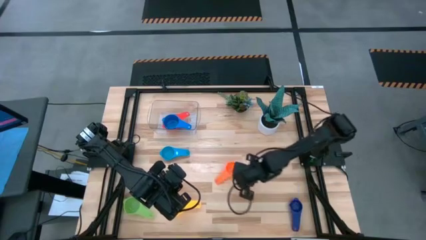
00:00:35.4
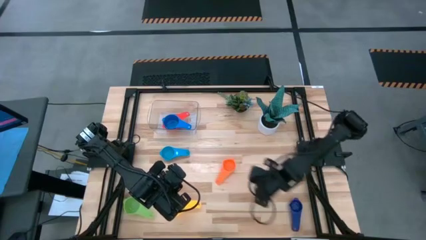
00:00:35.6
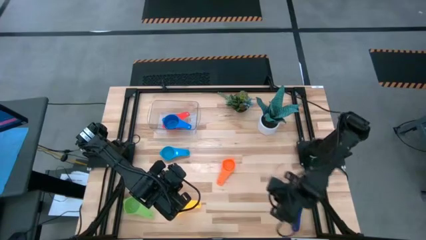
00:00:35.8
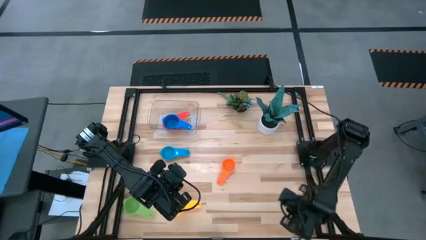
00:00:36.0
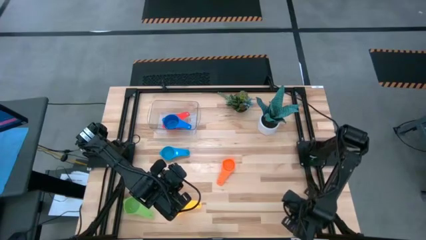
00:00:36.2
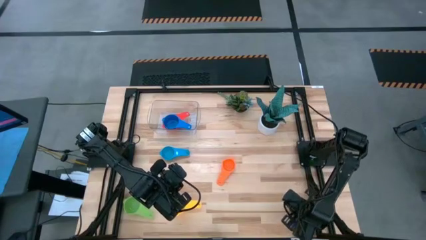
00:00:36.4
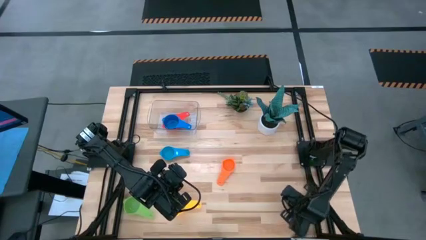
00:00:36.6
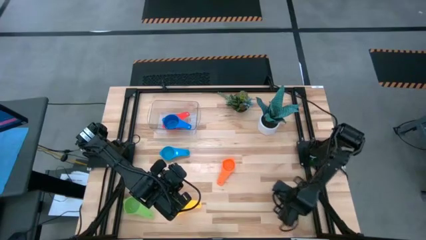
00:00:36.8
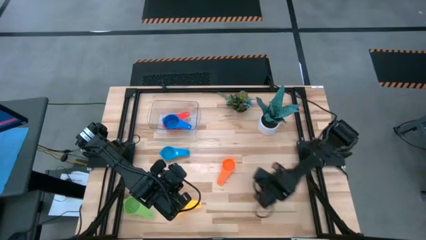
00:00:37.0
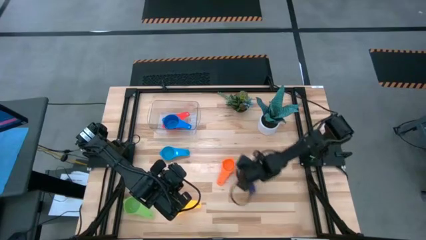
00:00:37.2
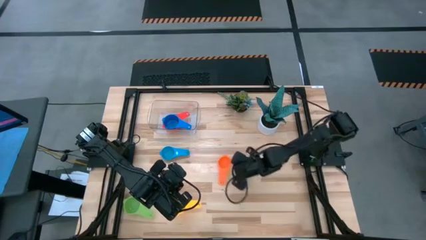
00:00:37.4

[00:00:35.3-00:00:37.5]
Task: Nest measuring cups in basket
Move the dark blue measuring cup to the center of the table

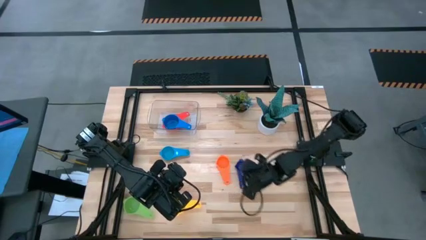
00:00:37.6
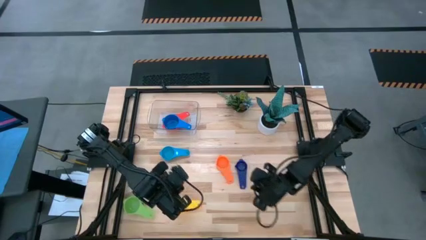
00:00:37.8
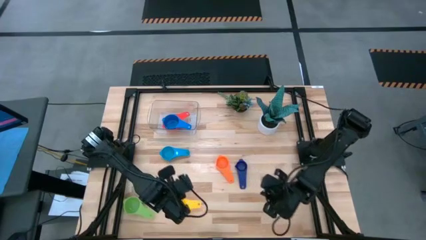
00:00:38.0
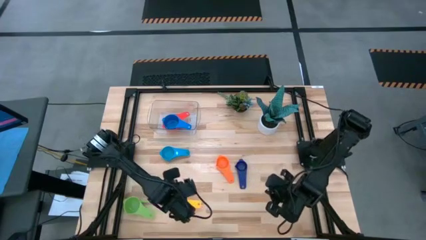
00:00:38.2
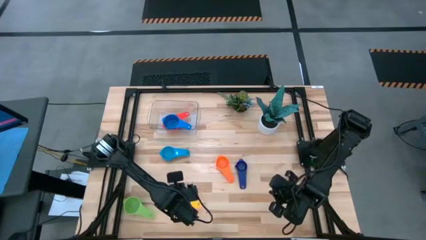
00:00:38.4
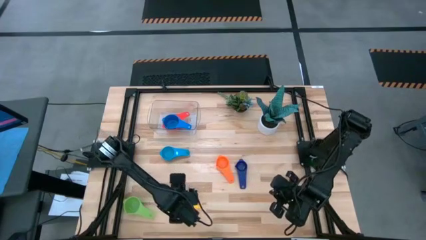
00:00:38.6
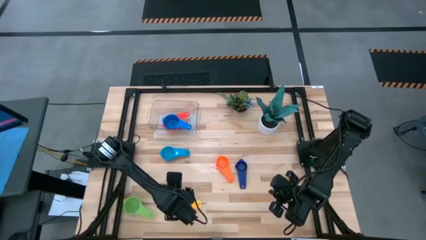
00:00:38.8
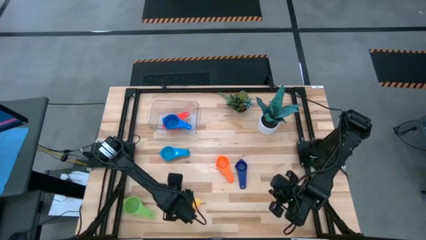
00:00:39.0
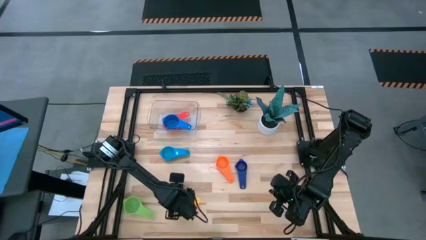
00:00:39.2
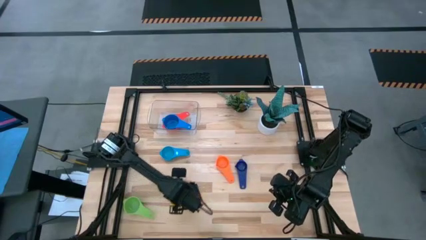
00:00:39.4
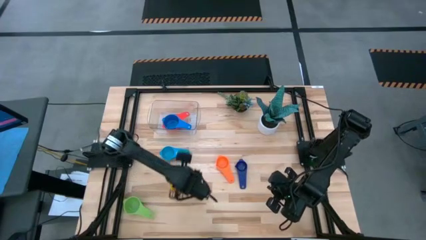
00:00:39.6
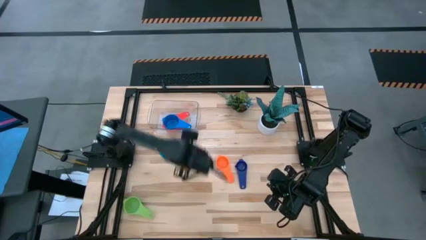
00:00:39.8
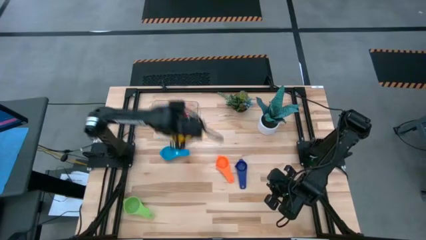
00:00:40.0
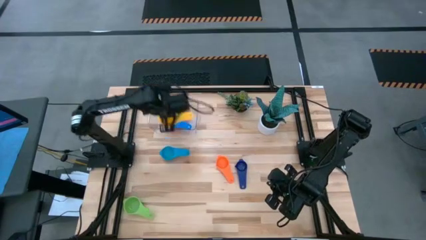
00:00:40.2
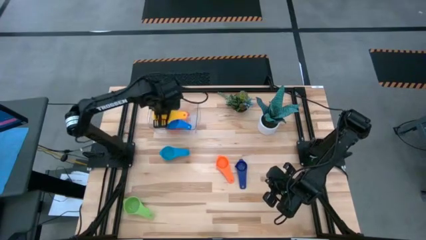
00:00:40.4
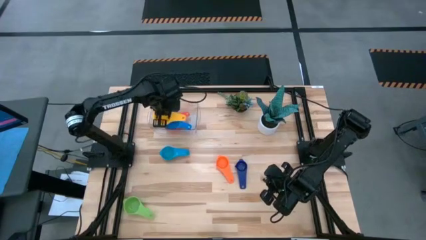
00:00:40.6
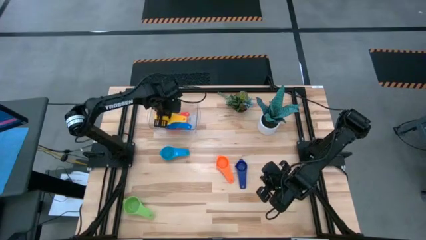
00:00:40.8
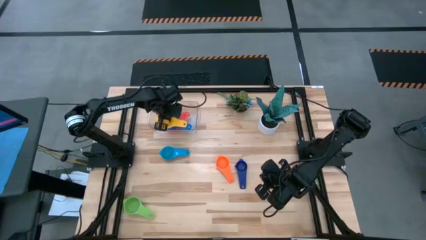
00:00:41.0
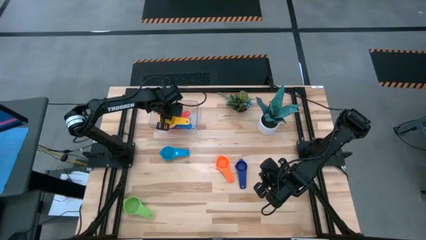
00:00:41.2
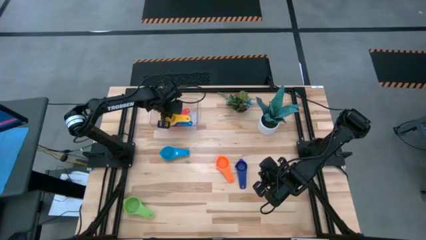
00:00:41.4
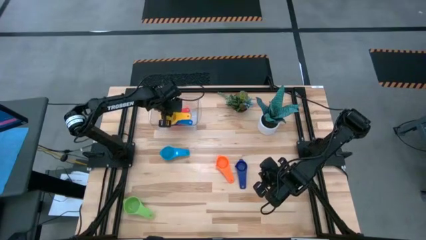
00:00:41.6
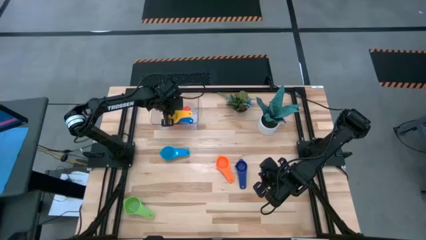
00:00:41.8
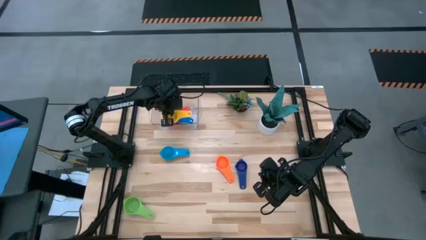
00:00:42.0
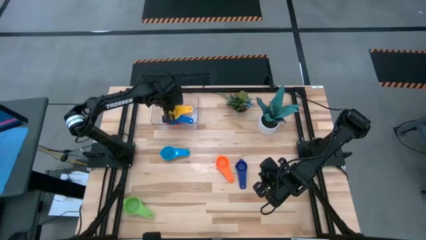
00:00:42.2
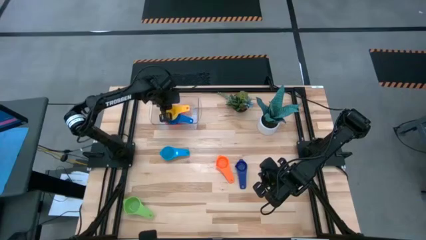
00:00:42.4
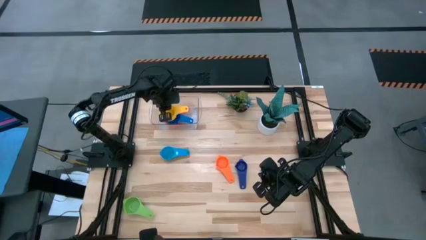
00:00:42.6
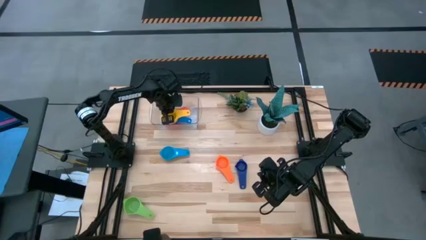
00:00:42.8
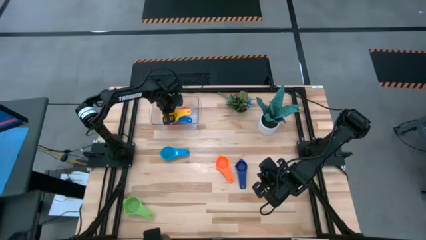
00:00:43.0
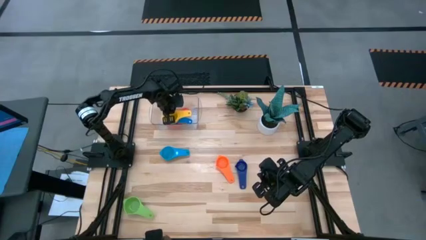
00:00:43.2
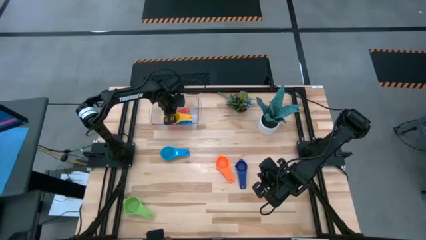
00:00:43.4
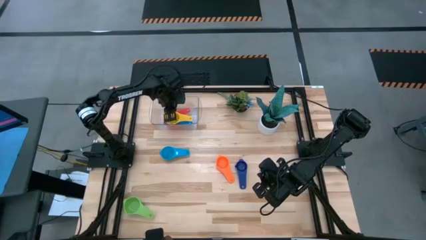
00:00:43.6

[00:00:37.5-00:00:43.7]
Stack the yellow measuring cup on top of the blue measuring cup in the transparent bin

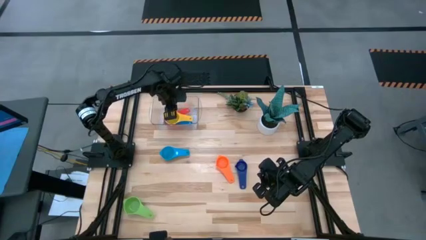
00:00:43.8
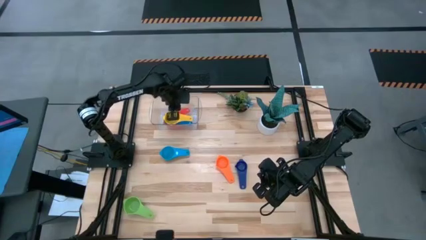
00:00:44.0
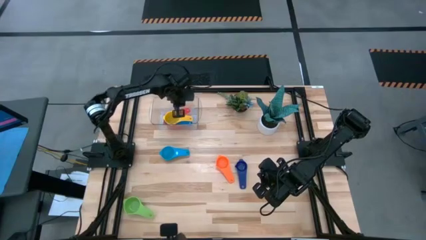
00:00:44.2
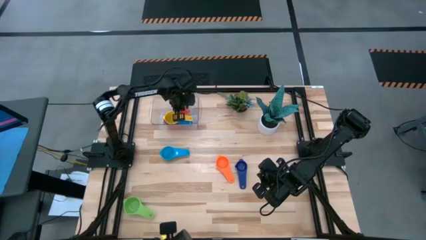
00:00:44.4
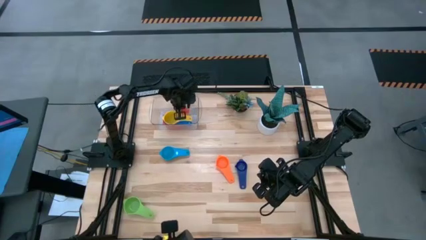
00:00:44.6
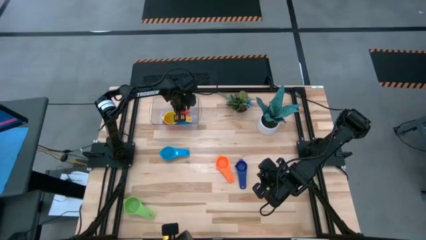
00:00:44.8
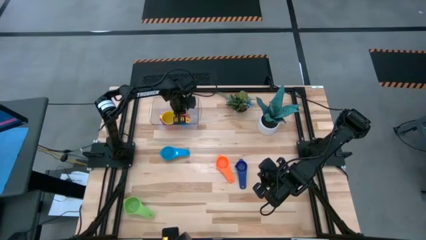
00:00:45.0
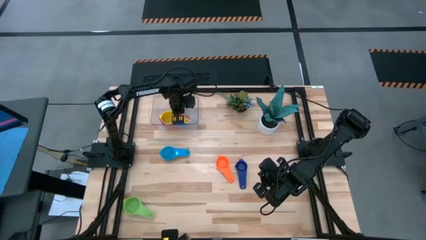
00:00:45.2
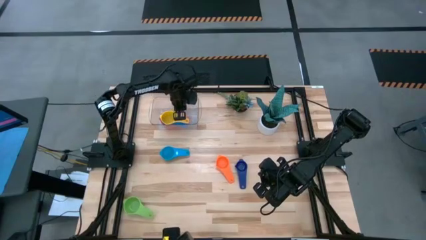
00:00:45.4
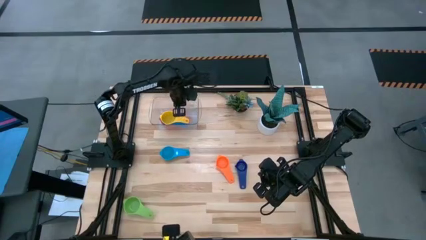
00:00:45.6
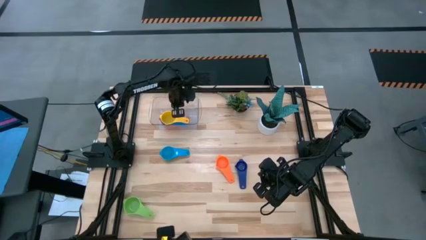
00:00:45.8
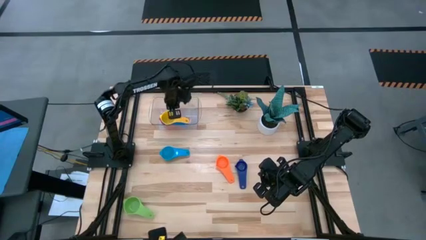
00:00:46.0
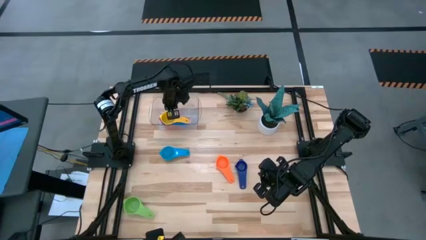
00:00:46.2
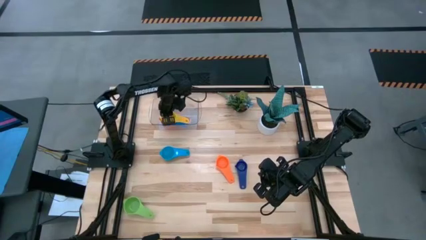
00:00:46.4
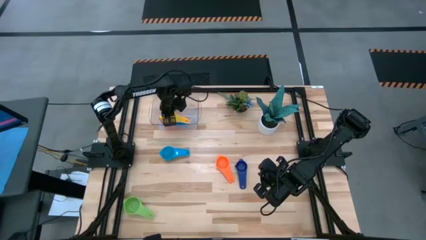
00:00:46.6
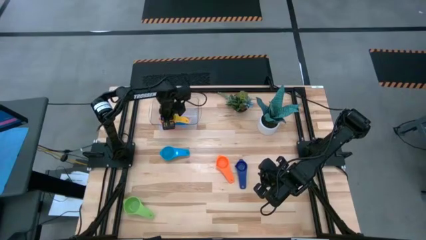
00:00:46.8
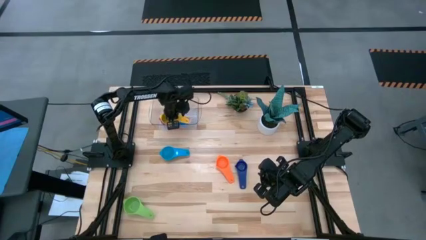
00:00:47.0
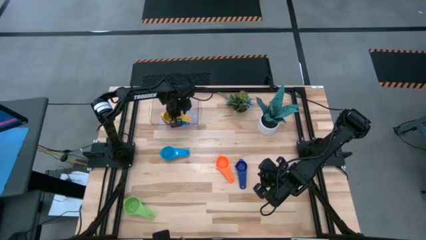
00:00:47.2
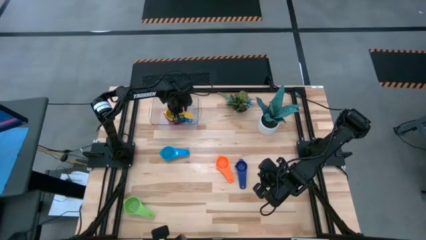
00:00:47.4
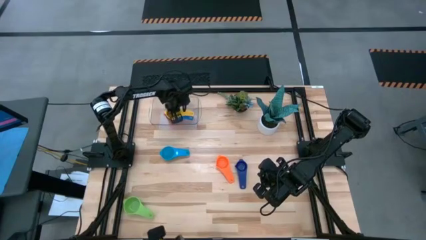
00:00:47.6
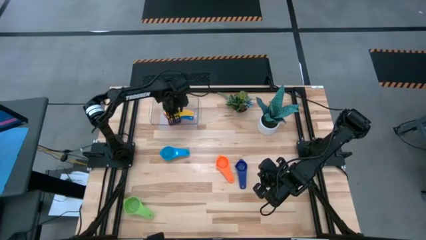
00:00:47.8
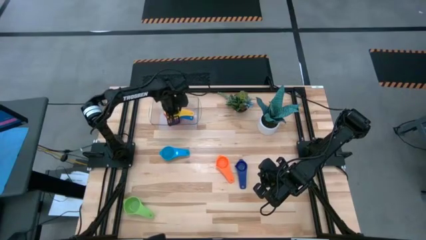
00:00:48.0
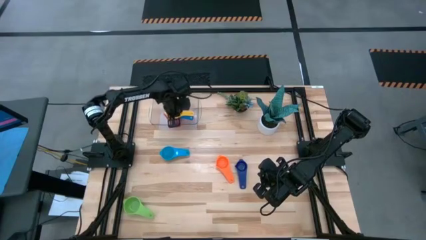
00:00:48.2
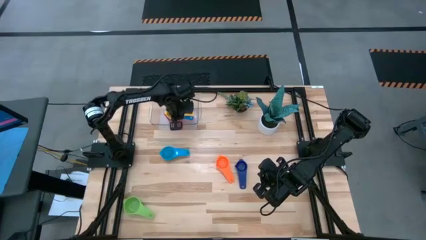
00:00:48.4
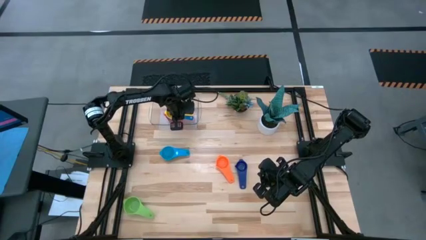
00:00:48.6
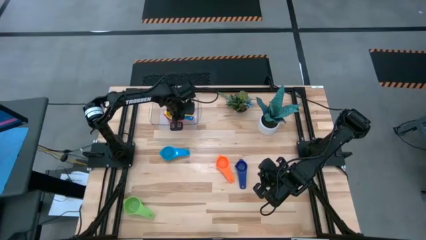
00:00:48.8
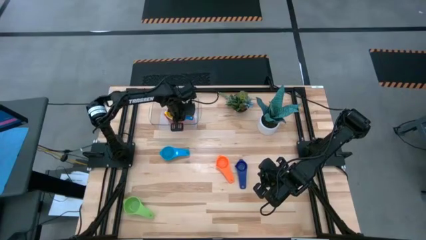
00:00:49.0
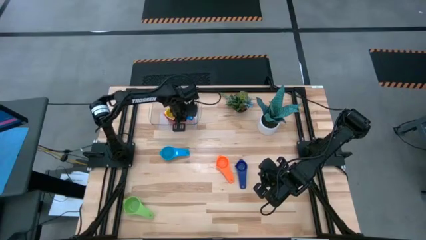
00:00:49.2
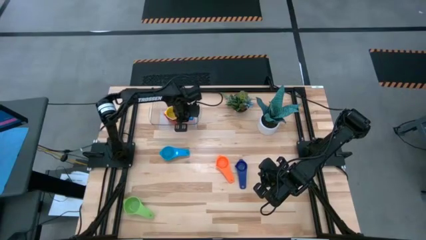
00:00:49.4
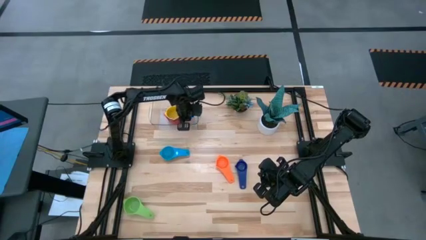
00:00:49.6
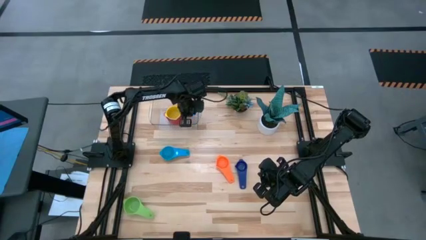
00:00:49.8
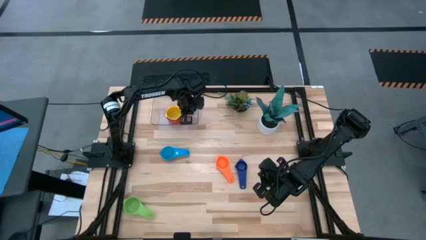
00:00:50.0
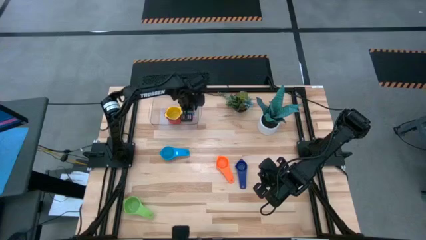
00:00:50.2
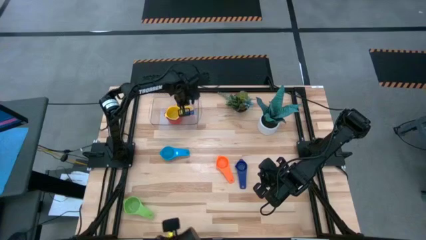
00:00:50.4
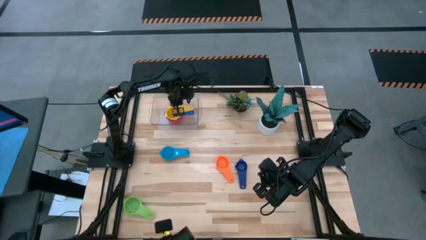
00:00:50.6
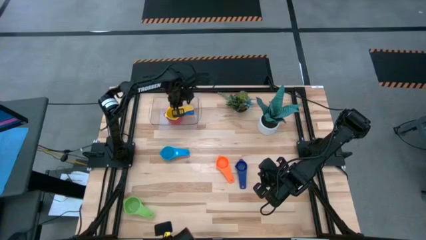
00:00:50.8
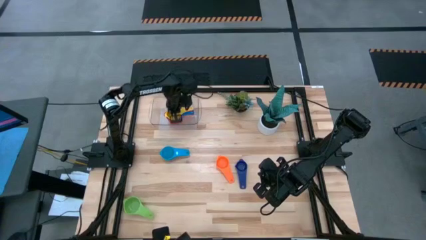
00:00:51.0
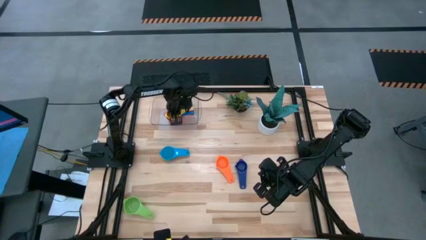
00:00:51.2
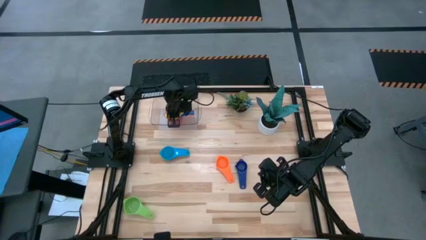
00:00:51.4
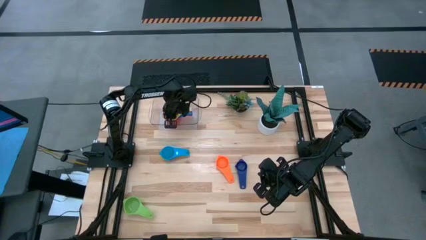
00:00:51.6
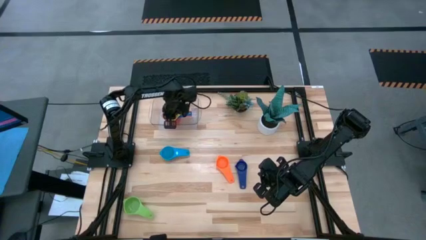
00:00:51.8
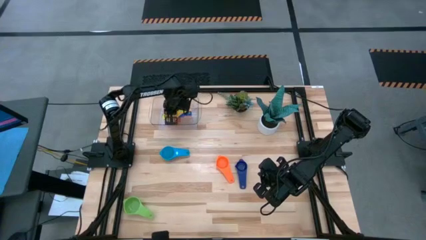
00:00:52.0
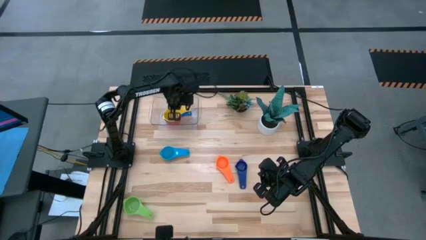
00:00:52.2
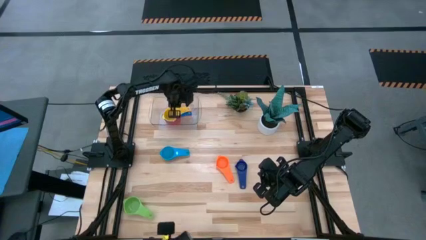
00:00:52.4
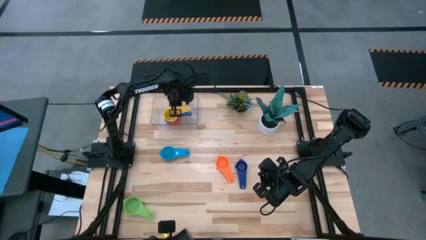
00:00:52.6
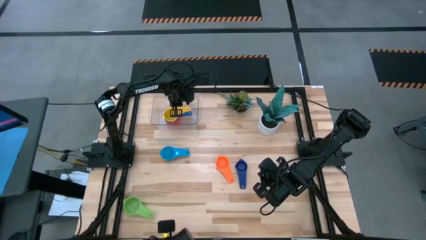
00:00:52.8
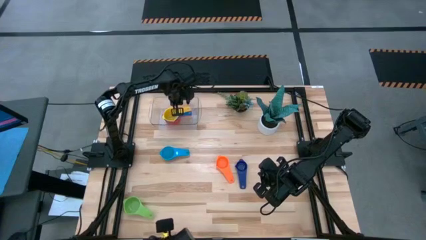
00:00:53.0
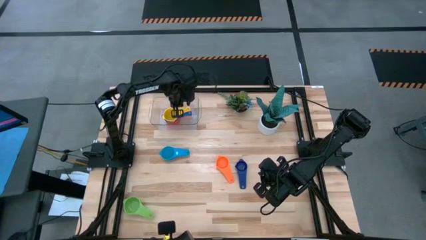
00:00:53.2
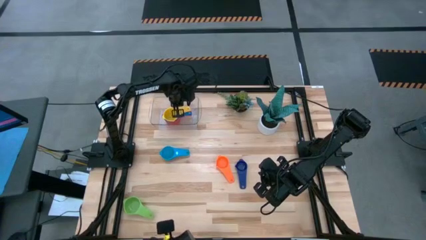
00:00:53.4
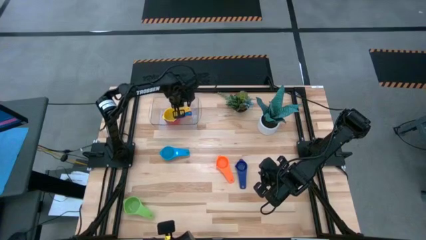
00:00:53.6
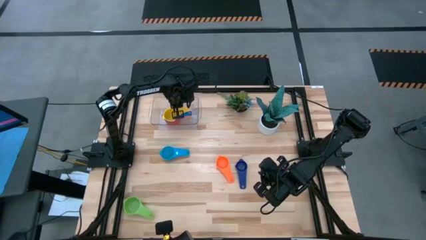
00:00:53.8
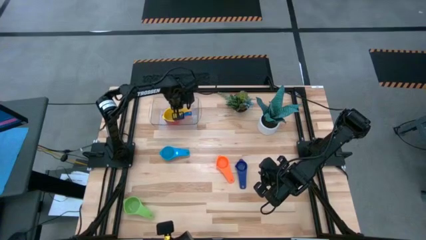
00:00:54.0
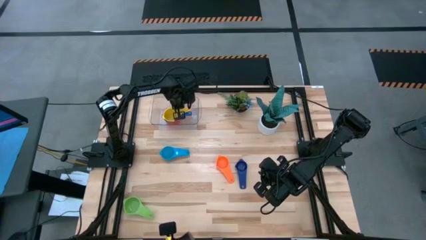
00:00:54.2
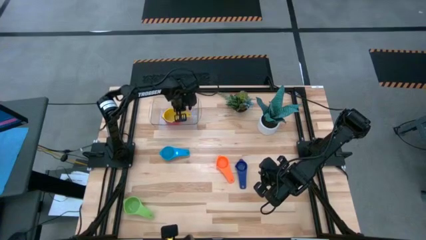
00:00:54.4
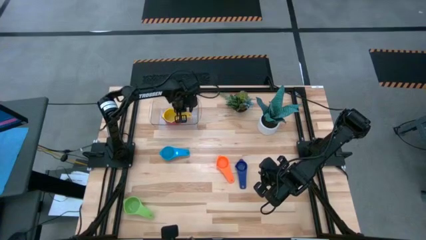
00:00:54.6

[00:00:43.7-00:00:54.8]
Adjust the stacked measuring cups in the transparent bin
